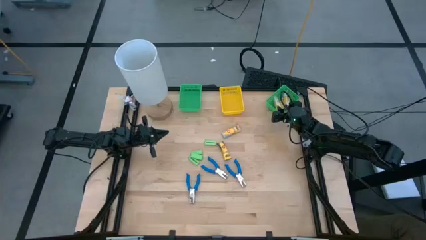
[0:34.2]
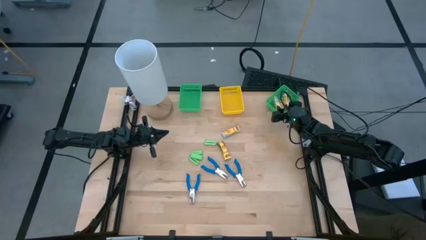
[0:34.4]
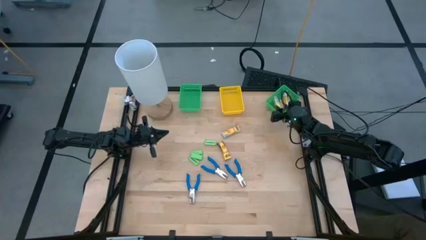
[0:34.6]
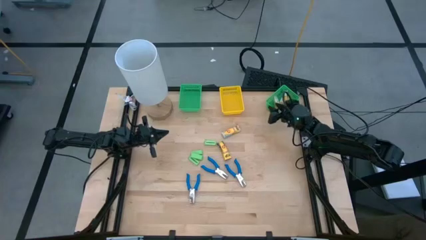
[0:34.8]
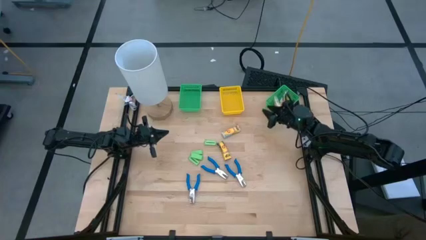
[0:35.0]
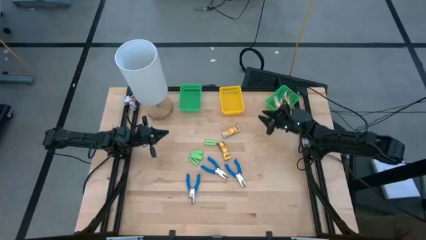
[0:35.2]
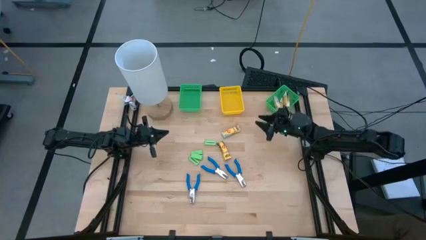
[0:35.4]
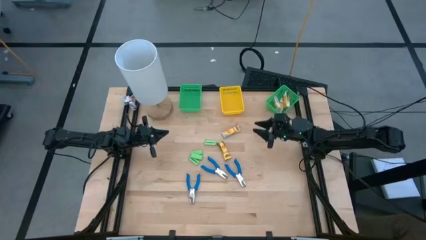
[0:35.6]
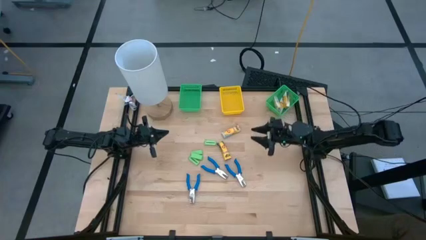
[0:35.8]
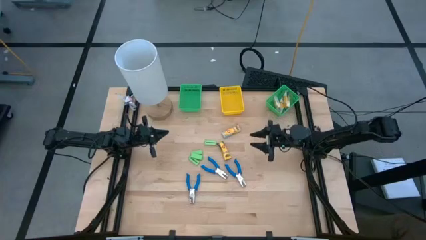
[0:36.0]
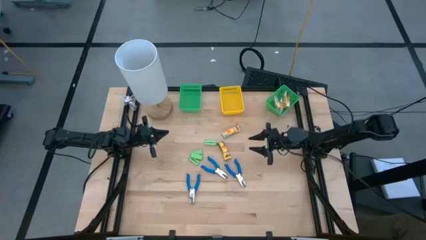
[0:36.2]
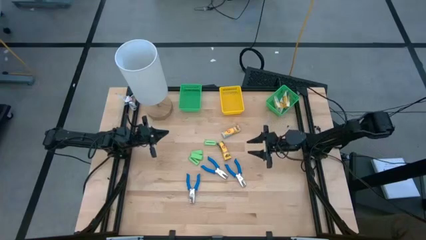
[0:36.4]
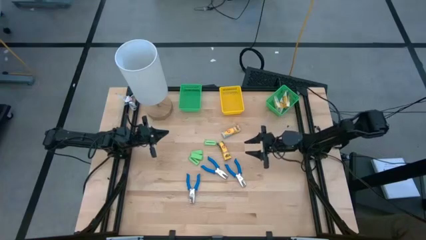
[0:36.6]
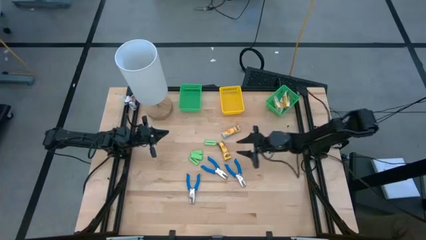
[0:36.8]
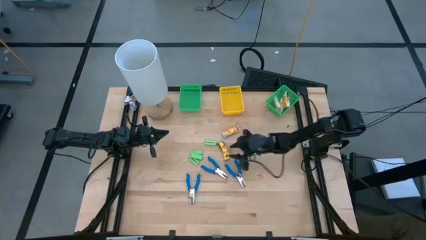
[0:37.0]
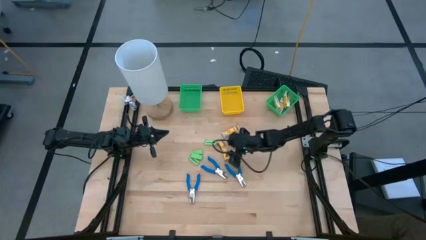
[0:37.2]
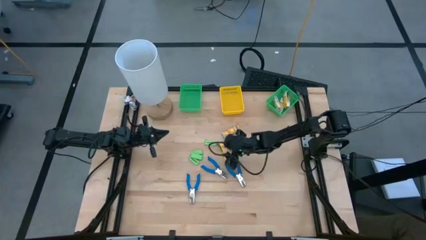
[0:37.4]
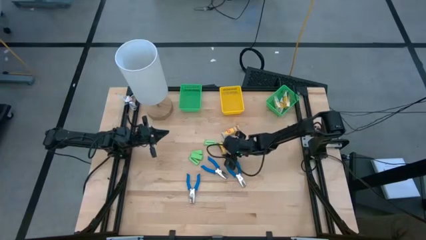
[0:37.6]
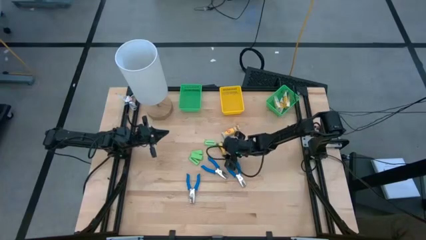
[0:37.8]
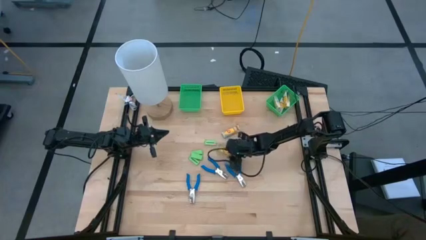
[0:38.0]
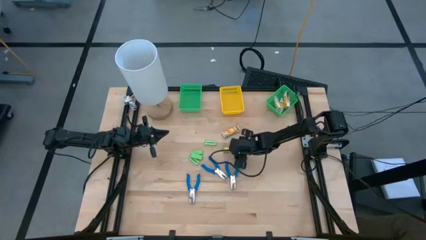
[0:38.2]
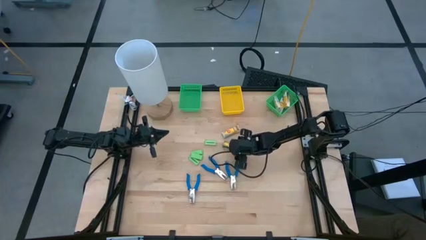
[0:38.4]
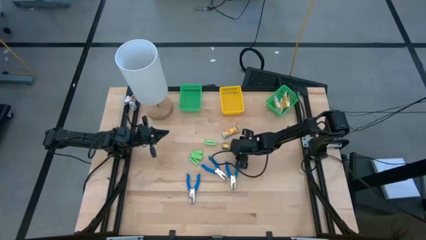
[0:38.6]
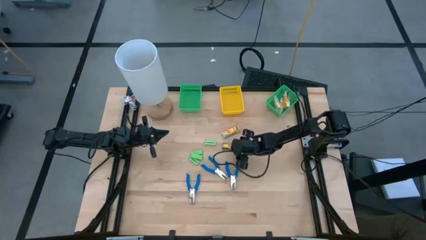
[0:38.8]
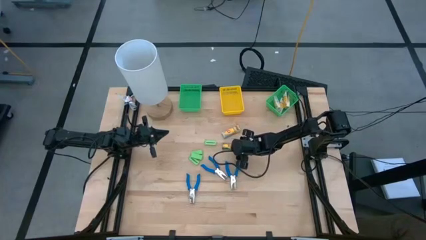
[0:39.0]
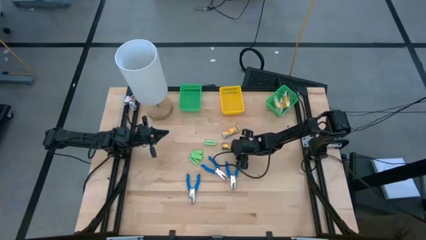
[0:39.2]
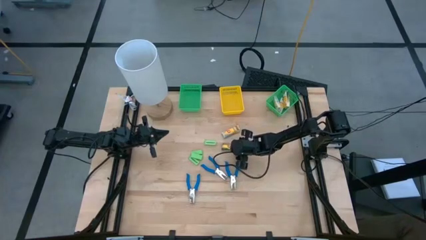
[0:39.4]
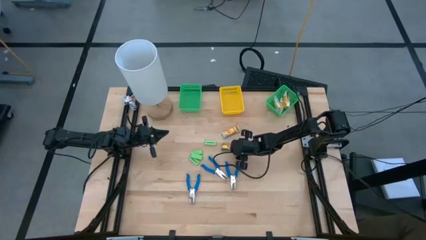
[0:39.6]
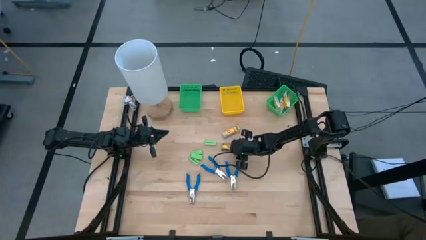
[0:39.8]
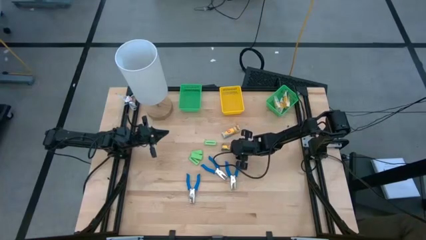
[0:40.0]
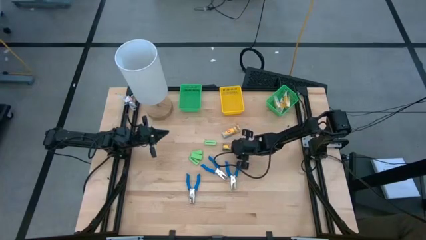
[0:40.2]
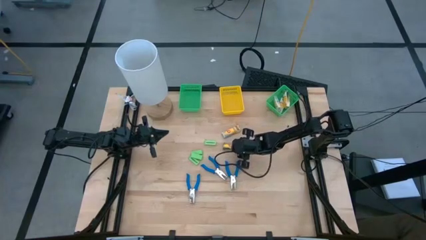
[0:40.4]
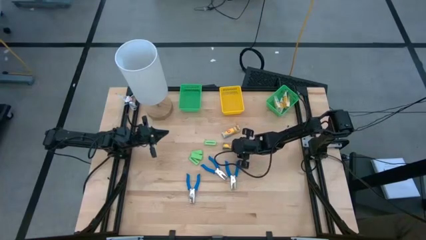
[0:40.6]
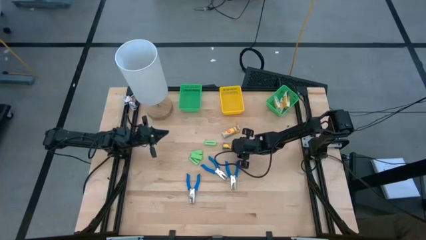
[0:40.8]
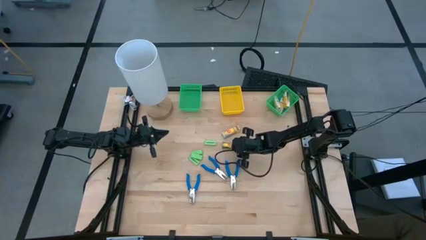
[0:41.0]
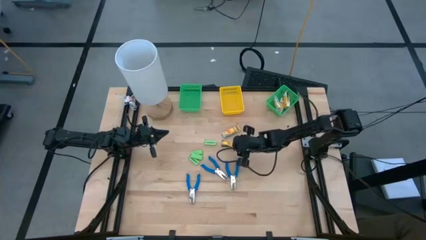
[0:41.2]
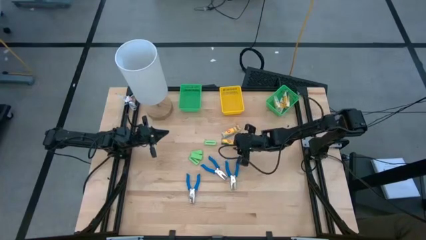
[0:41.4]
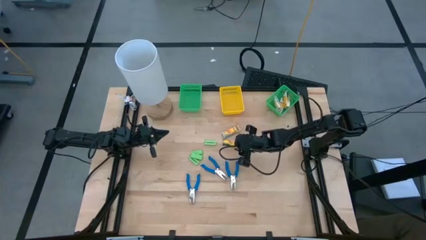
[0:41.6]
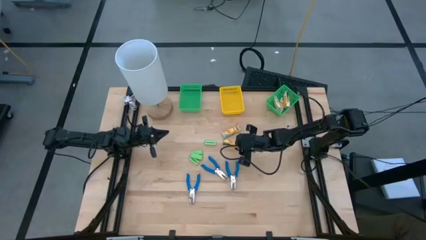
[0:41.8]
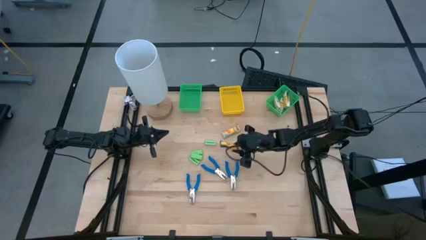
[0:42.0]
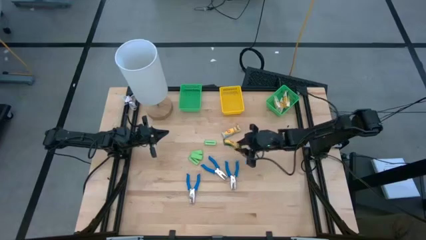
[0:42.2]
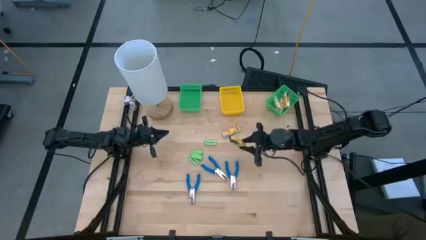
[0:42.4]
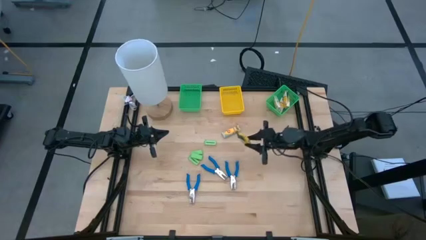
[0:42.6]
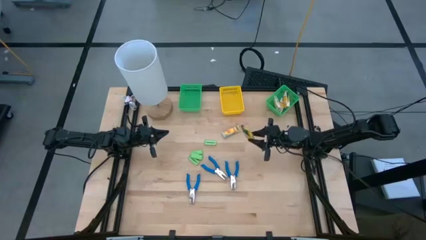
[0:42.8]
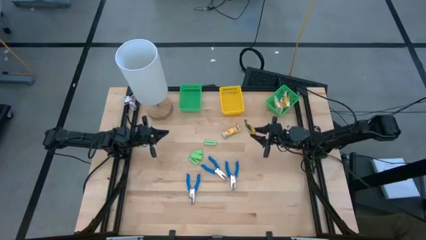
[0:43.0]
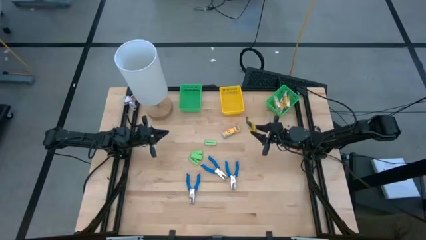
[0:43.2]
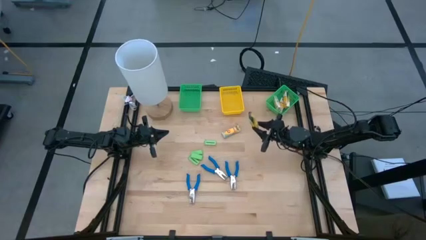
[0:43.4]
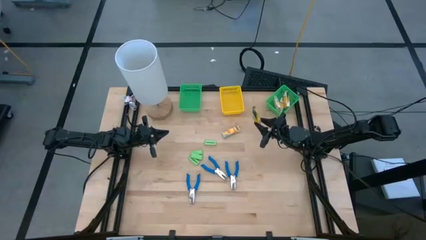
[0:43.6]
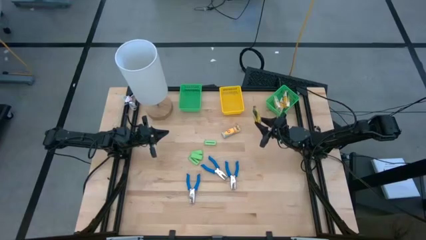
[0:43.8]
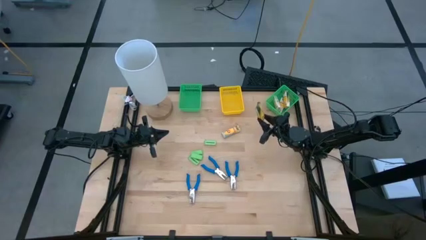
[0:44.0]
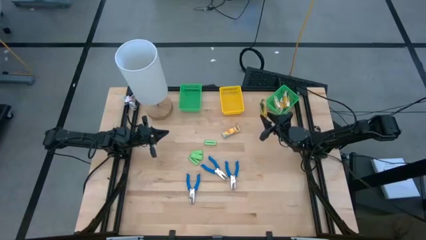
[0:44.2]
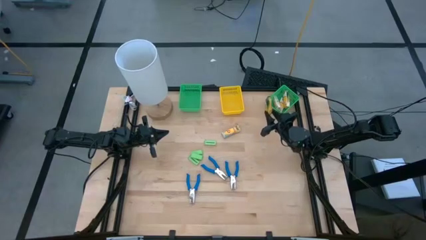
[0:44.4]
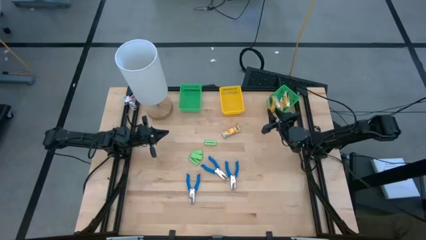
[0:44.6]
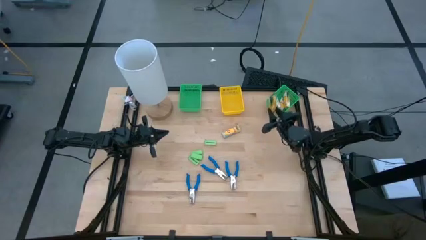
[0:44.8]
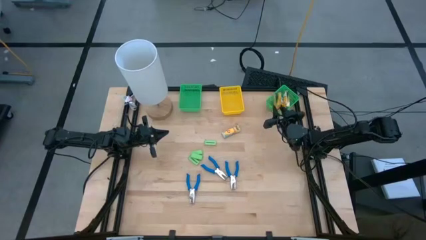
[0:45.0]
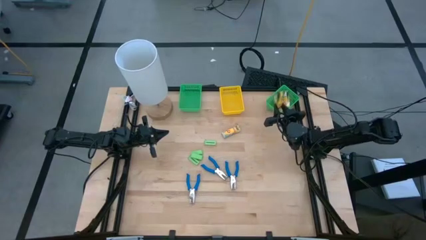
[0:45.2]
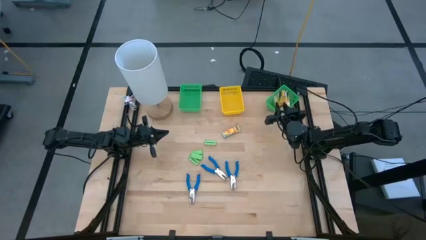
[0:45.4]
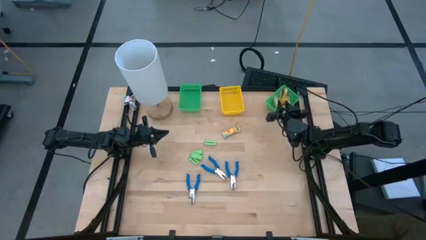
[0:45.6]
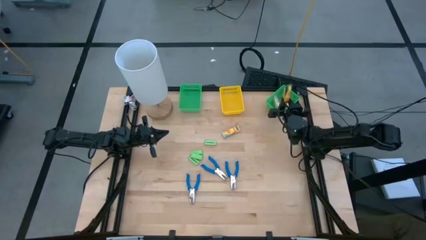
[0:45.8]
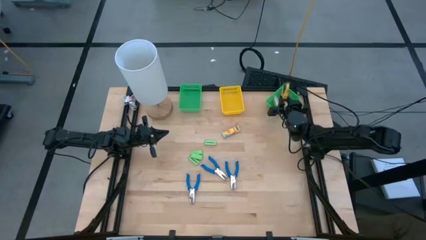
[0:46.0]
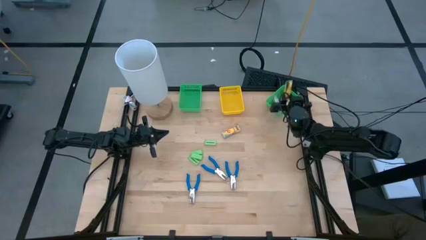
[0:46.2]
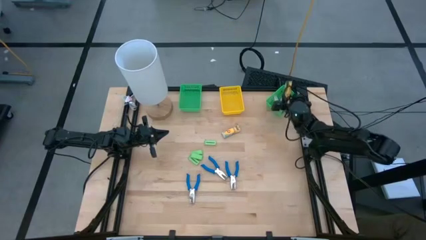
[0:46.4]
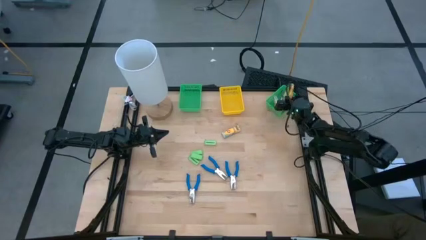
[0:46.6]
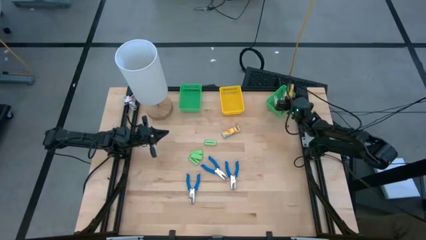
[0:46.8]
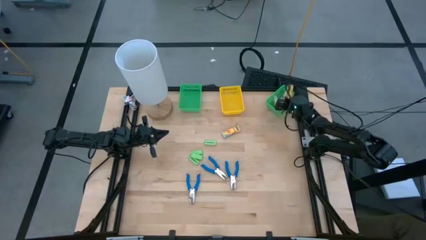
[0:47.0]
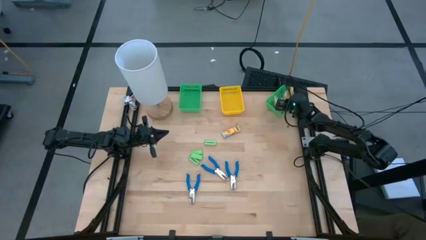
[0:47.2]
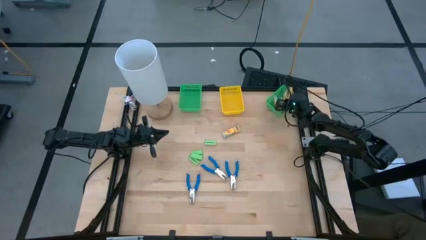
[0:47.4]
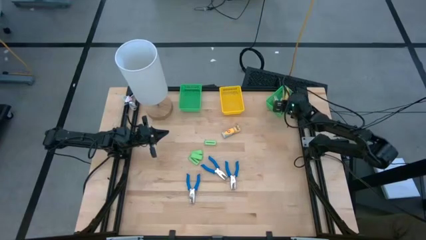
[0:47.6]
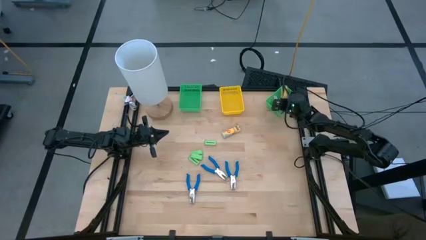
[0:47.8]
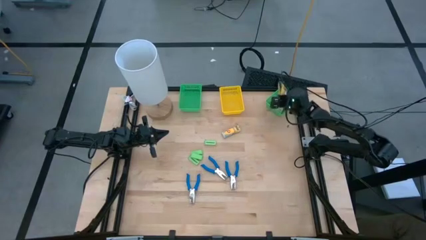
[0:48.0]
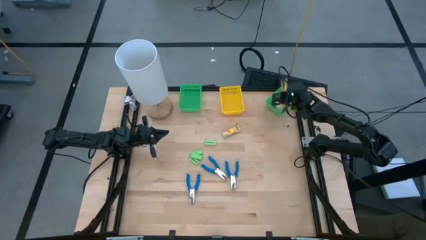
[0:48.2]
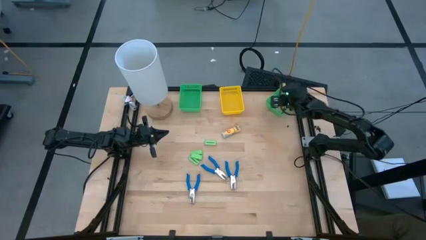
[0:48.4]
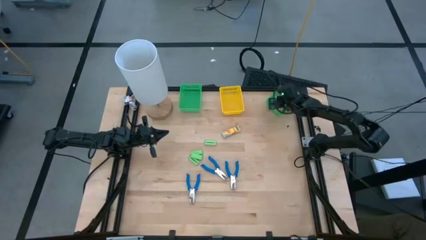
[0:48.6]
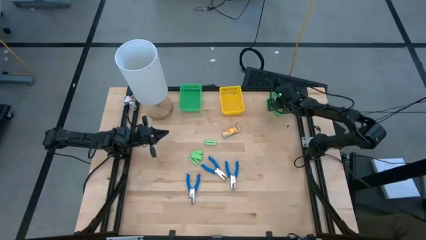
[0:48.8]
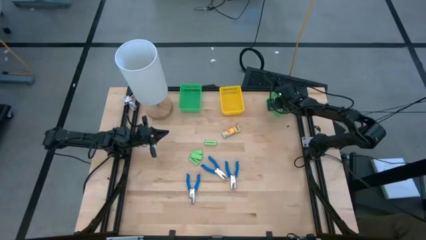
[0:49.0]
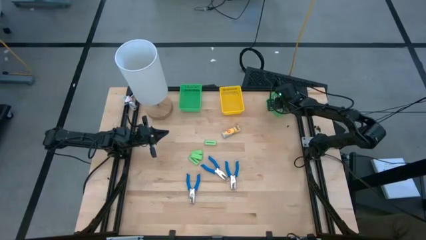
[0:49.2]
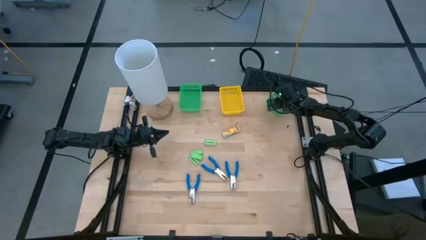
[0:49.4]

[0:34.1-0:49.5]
Task: Pick & Place School Supplies
Put the yellow crayon box into the right green bin
